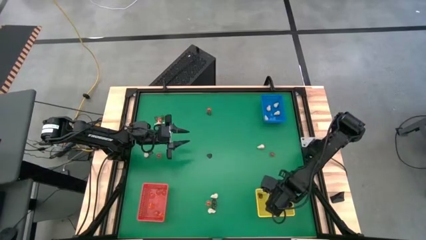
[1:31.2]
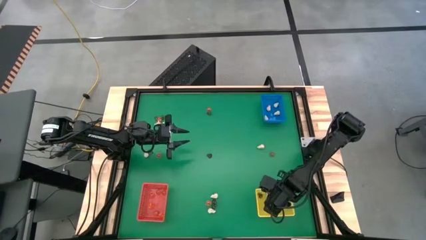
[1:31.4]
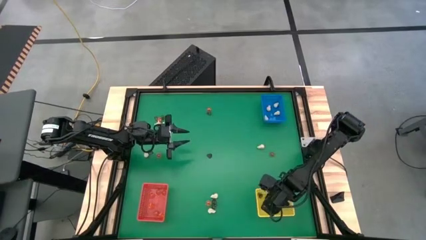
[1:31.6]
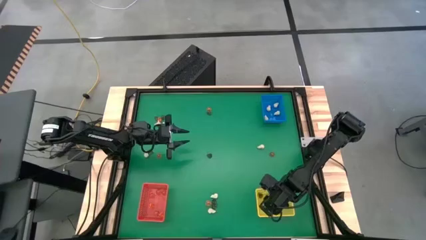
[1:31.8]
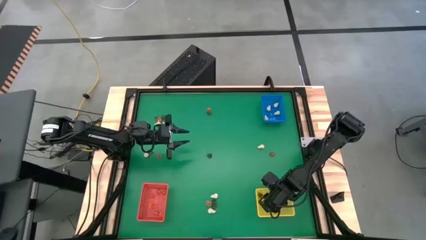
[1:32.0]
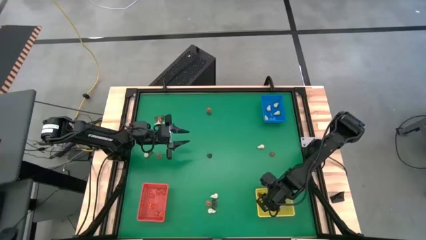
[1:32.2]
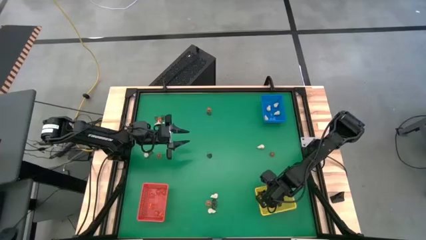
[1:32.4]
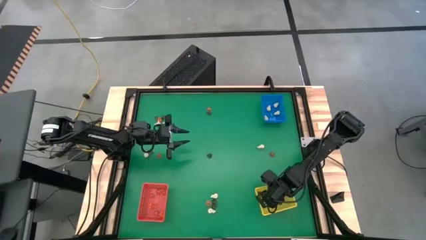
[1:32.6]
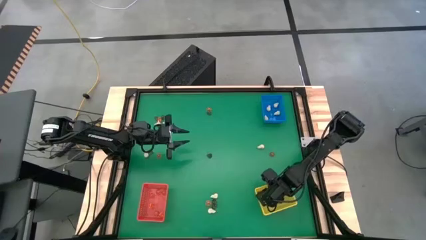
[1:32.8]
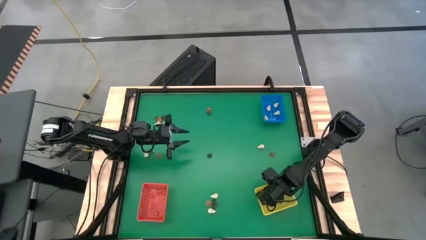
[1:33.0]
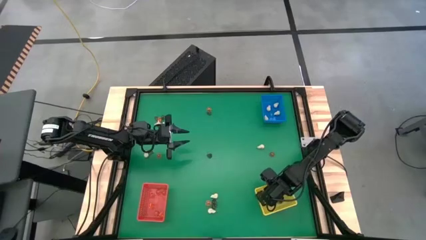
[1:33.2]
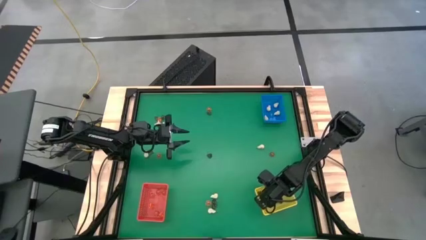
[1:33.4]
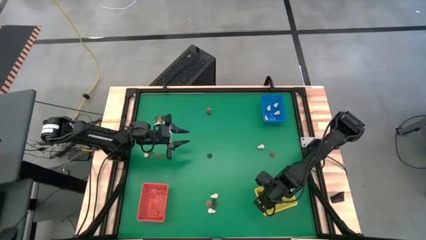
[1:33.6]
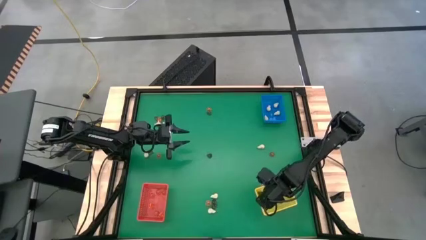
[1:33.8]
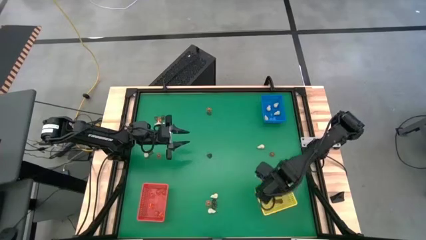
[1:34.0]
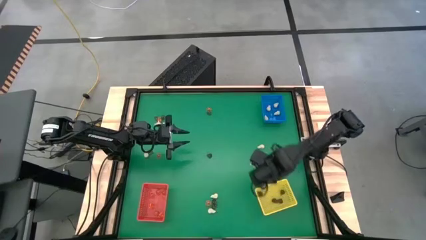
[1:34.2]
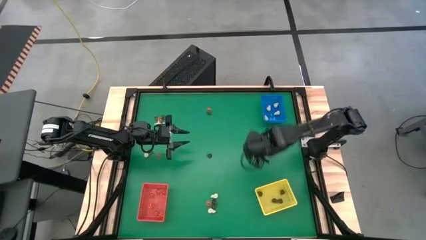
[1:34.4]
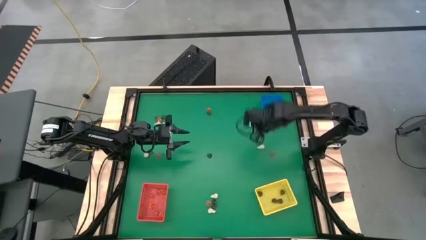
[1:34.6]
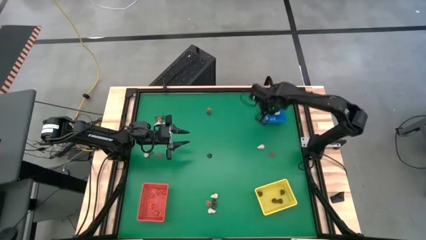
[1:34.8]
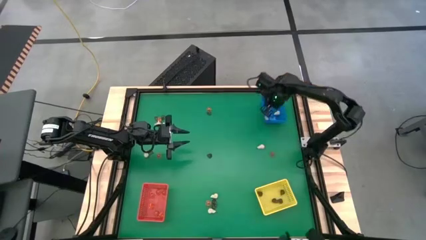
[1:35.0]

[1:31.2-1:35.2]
Task: Sort Halloween decoration
Put the white skull toy into the blue bin

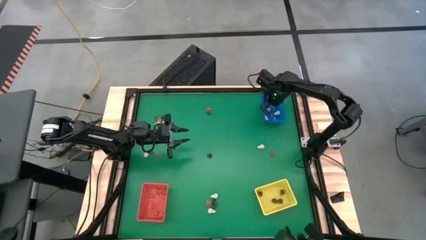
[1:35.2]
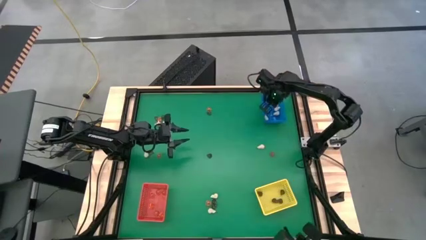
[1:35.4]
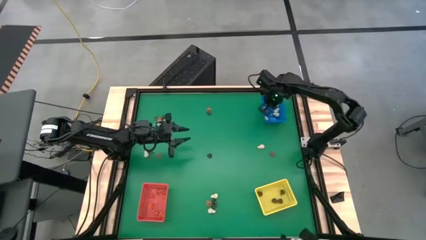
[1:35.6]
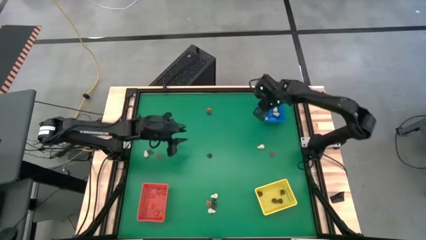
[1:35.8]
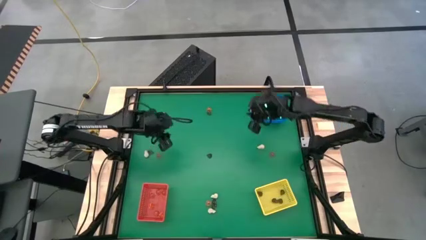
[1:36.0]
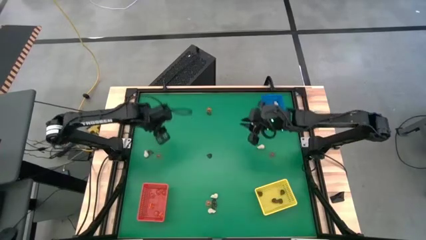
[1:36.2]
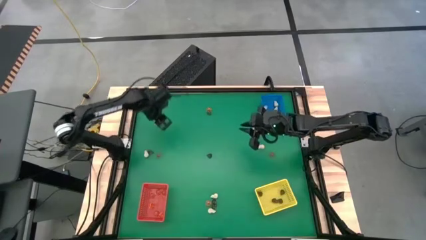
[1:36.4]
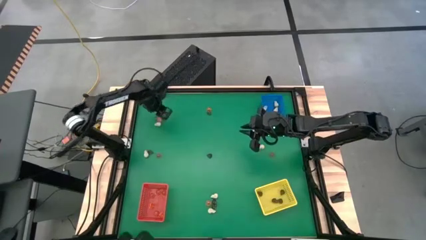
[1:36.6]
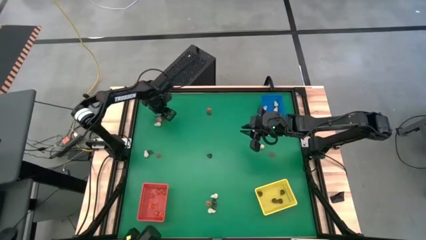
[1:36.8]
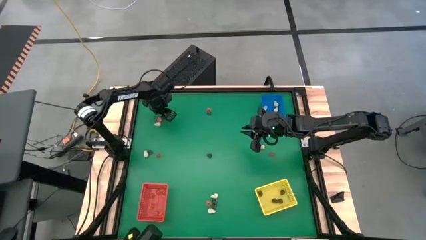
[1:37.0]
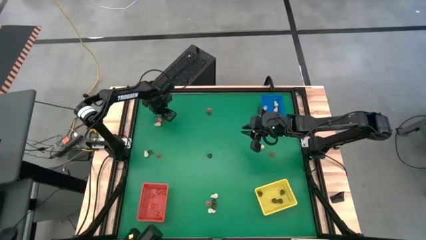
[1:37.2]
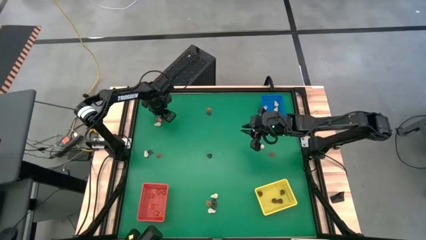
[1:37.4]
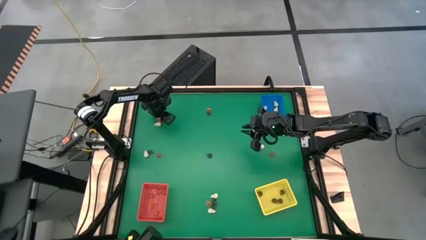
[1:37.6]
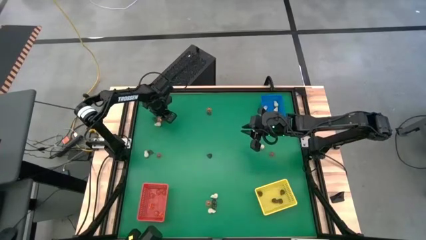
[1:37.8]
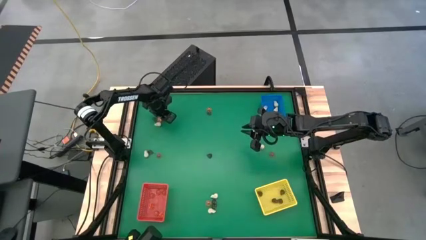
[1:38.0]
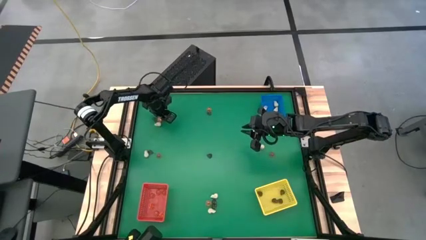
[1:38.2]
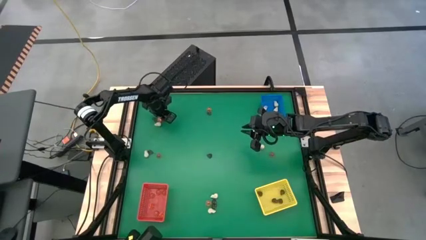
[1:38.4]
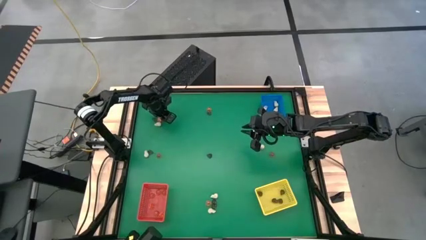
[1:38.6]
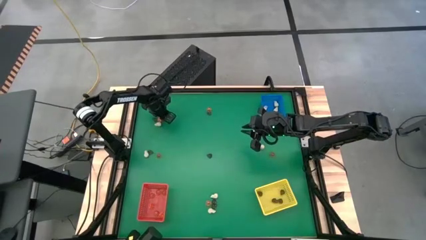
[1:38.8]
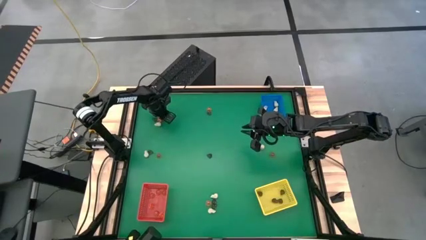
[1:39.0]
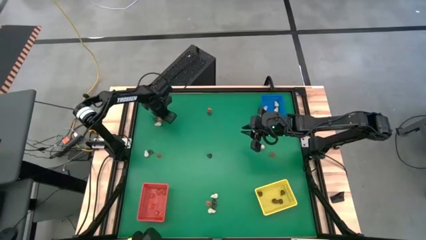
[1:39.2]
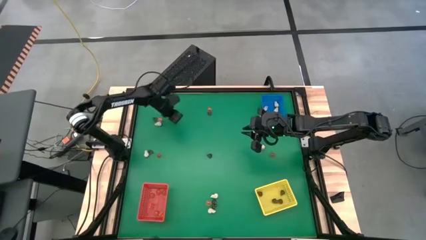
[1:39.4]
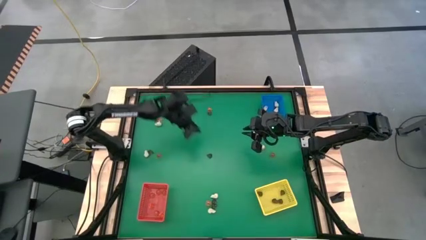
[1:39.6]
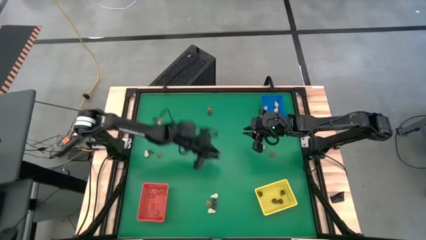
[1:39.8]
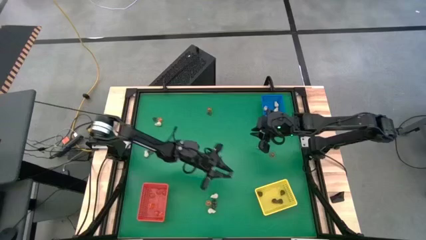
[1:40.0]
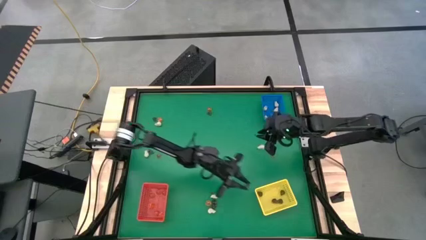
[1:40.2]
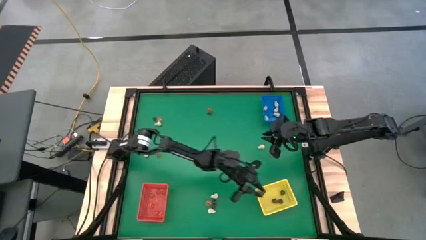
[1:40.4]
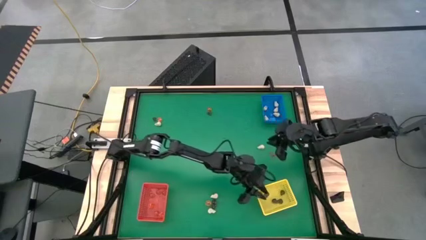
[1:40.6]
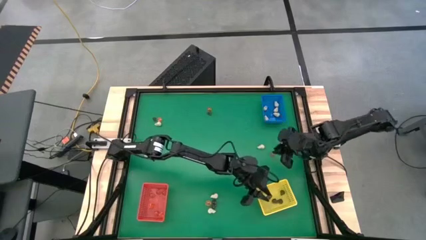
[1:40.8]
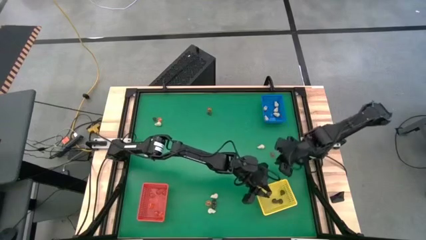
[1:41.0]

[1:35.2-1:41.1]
Put the black skull toy into the yellow bin

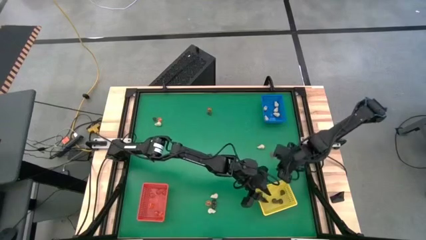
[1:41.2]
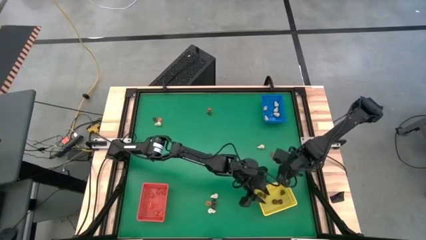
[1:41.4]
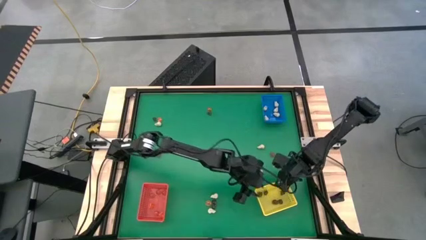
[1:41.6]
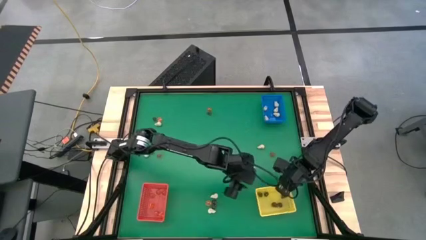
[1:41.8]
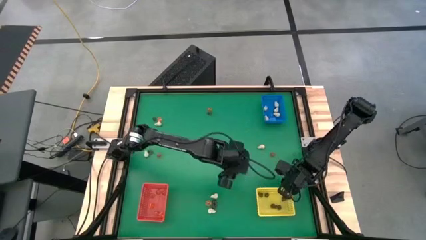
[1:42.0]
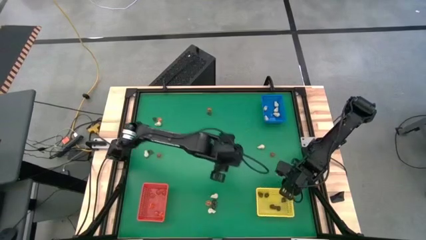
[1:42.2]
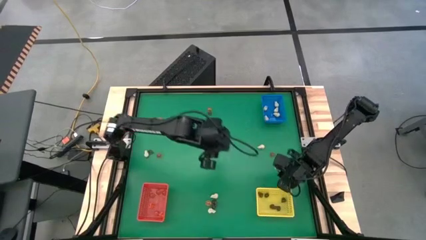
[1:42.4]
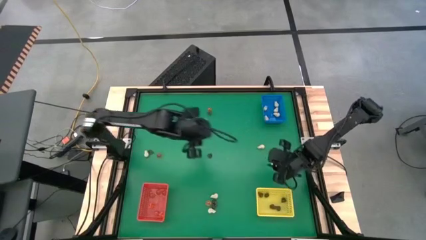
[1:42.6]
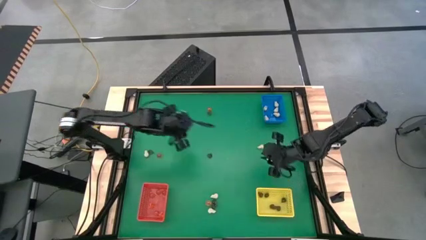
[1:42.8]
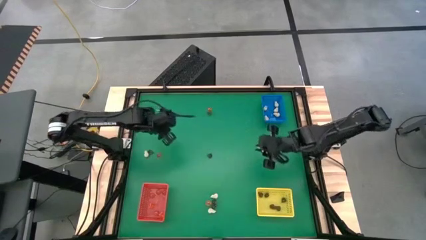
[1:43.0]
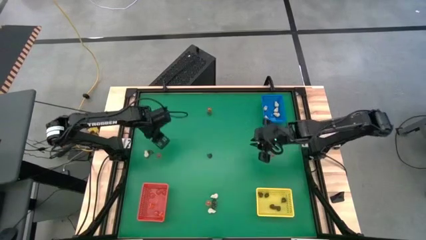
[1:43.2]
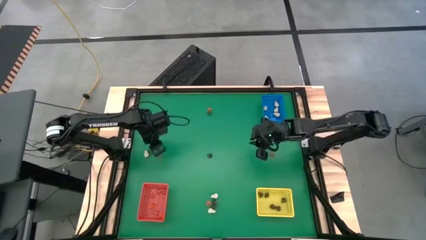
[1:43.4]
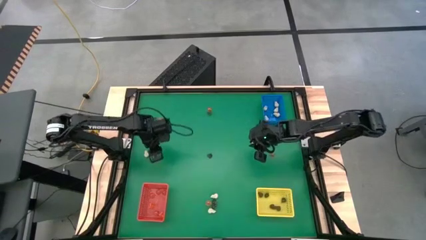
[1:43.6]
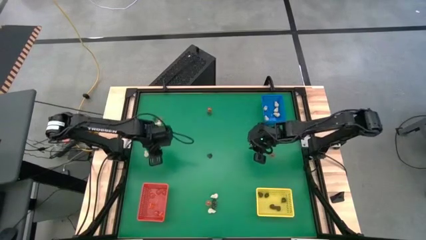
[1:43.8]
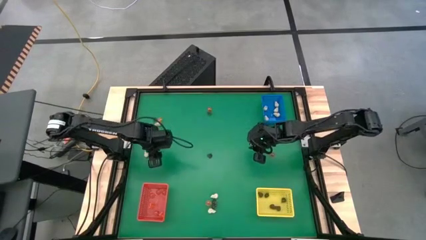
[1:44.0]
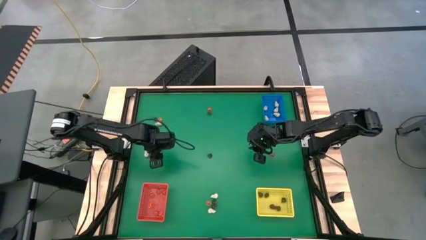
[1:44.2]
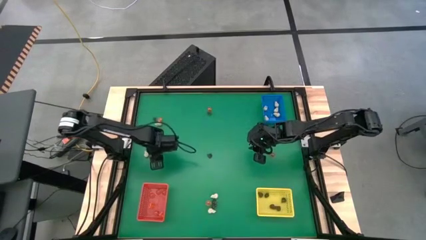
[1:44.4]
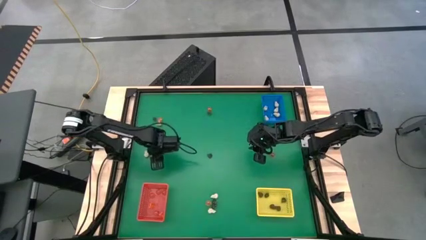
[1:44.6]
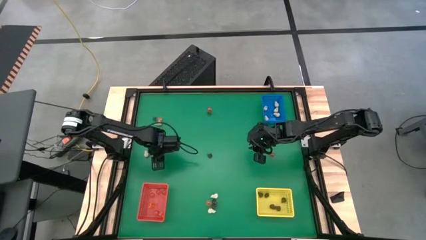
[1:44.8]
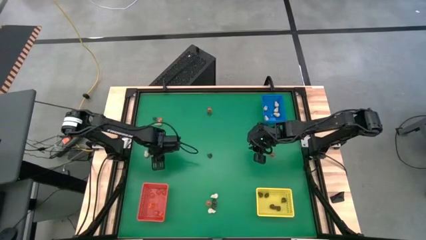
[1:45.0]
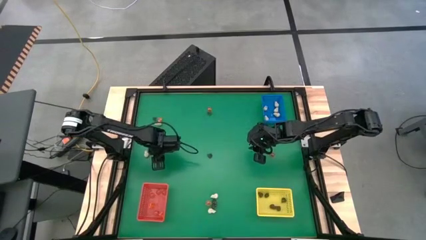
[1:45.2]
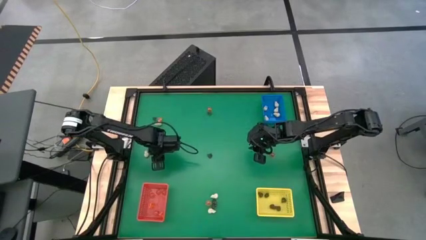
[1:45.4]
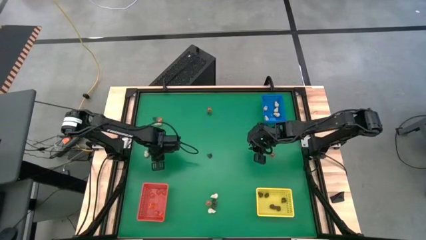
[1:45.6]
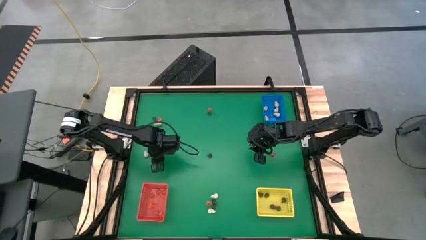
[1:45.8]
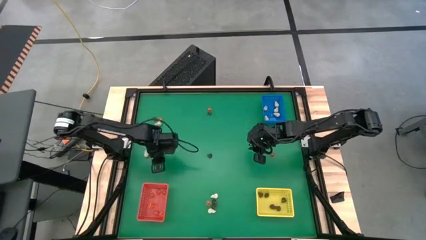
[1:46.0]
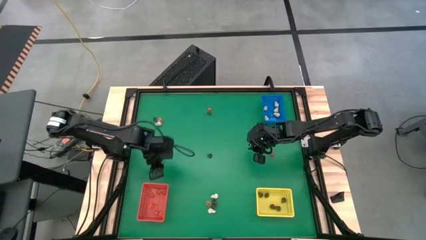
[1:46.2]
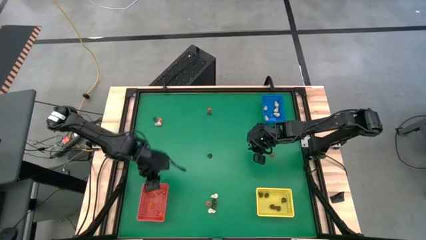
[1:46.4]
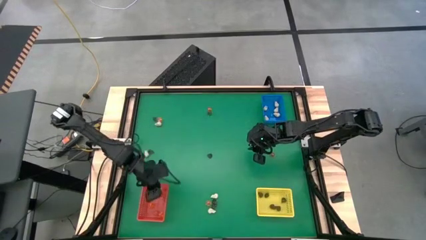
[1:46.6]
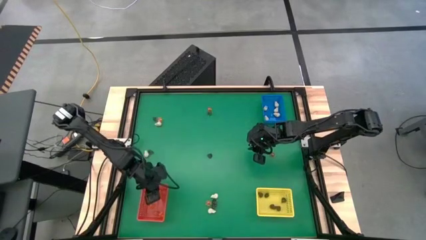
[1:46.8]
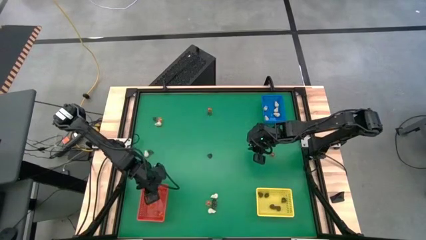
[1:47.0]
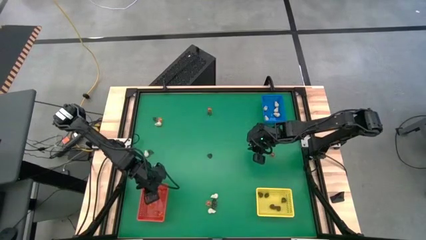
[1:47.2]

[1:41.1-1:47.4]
Put the orange pumpkin toy into the red bin
